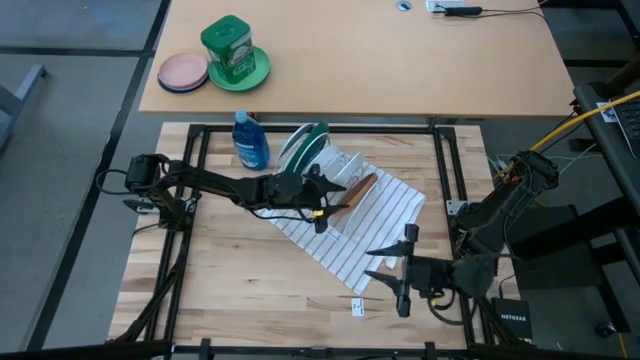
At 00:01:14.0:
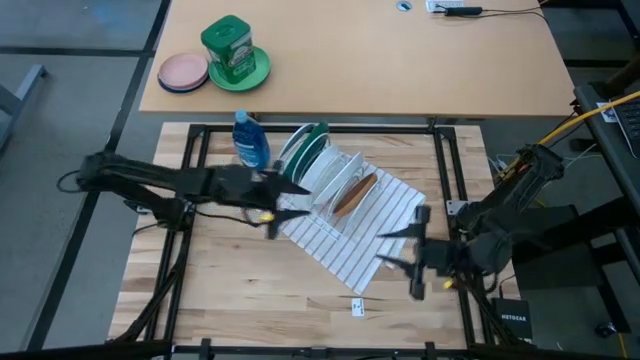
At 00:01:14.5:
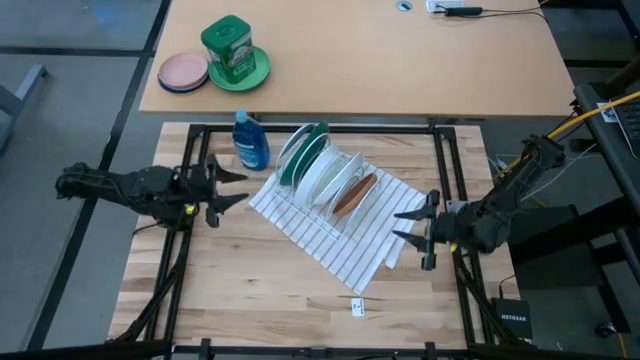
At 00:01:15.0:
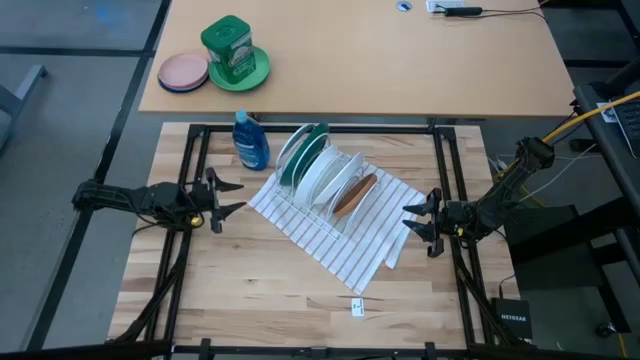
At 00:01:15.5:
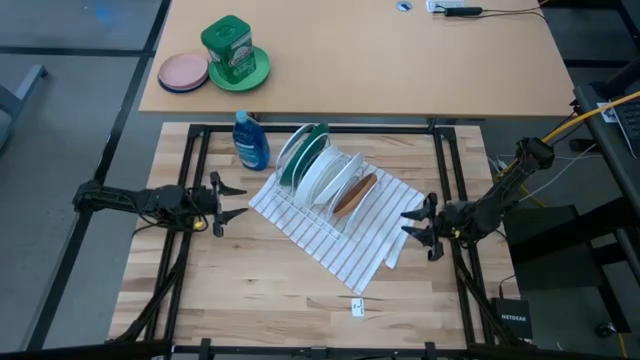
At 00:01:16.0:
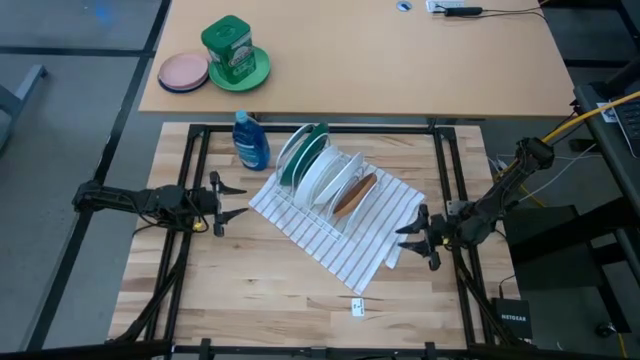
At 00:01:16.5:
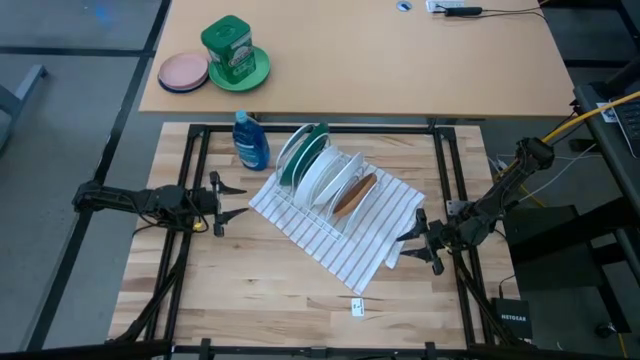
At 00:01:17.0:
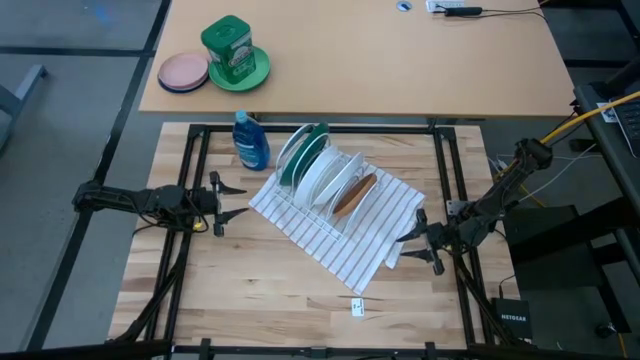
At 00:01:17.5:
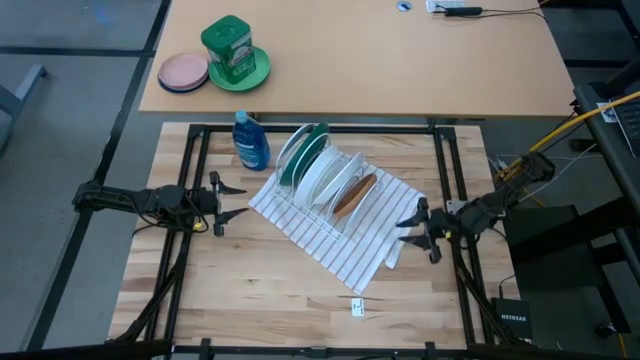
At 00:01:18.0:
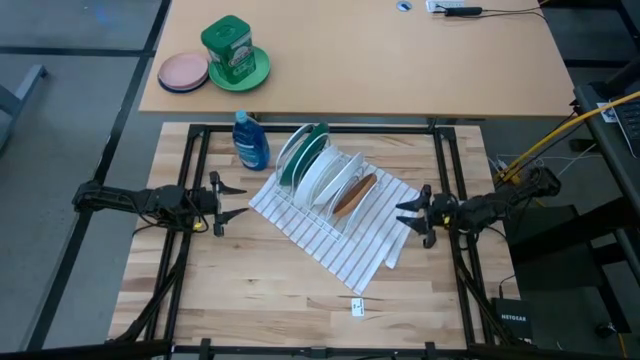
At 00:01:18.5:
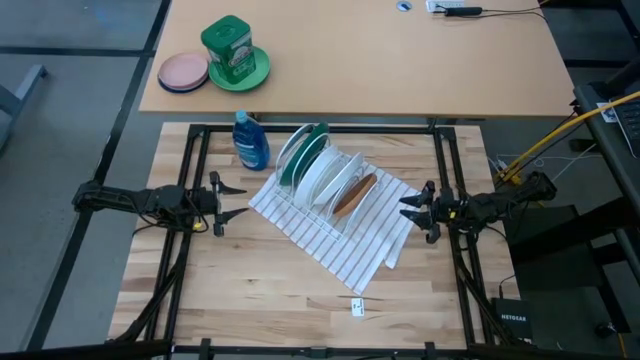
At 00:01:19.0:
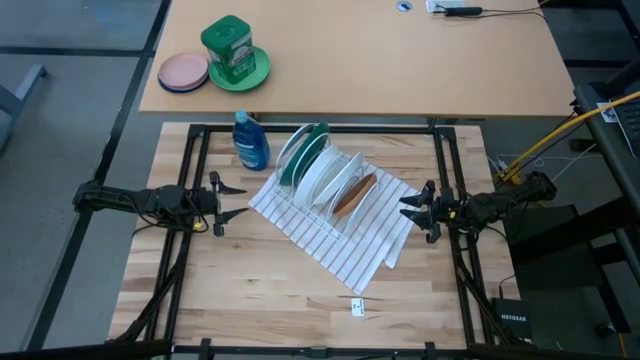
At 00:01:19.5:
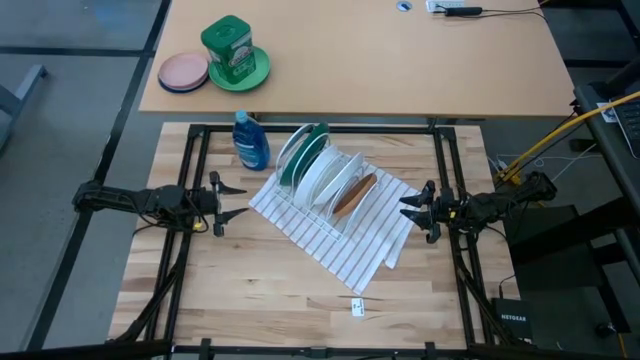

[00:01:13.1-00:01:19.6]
Task: Sort dishes
Return to Home Position

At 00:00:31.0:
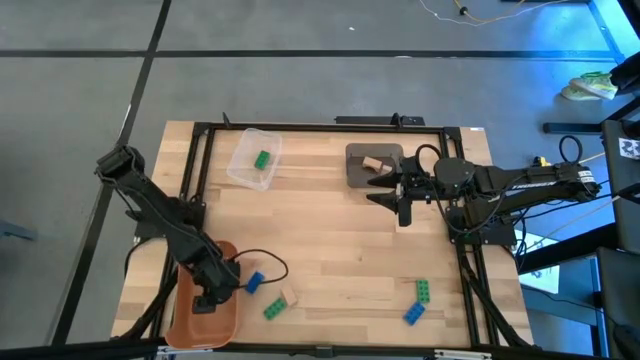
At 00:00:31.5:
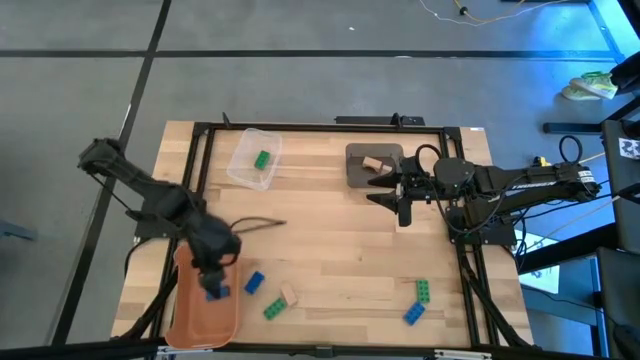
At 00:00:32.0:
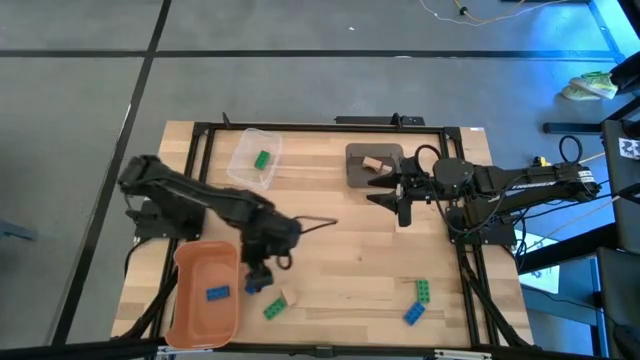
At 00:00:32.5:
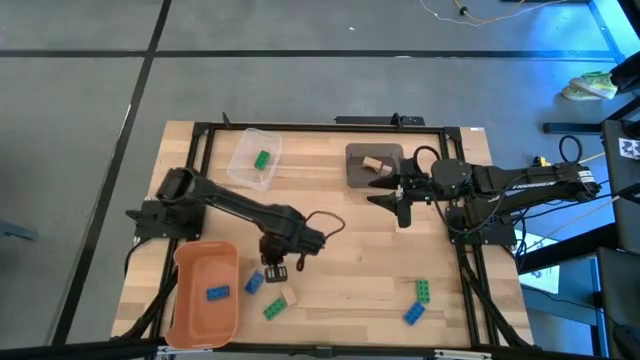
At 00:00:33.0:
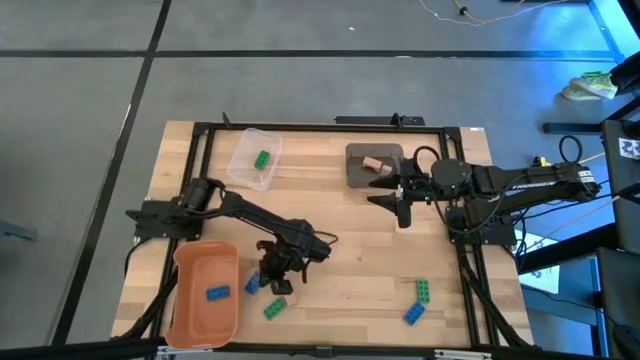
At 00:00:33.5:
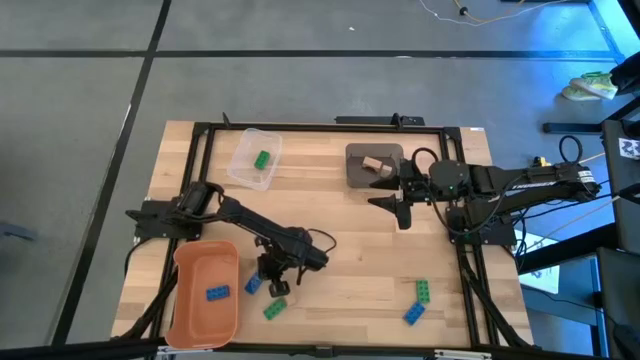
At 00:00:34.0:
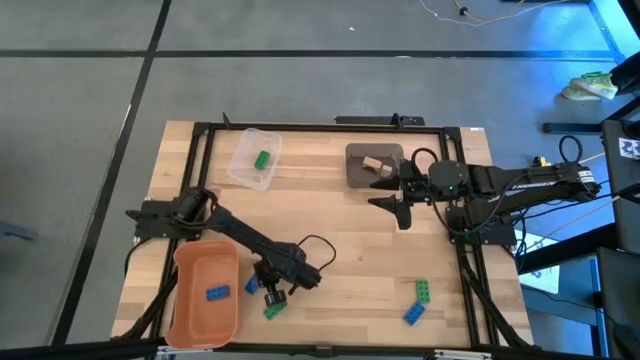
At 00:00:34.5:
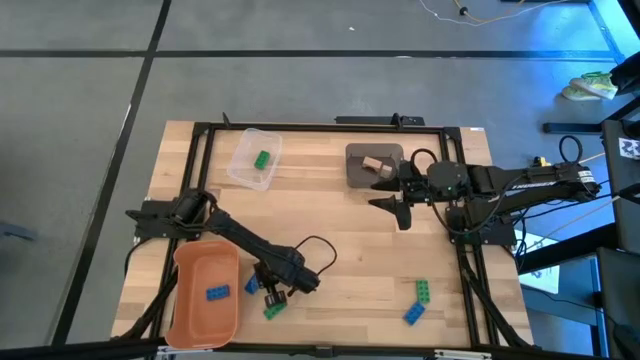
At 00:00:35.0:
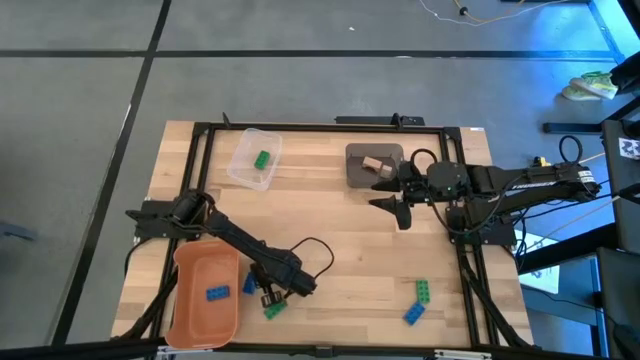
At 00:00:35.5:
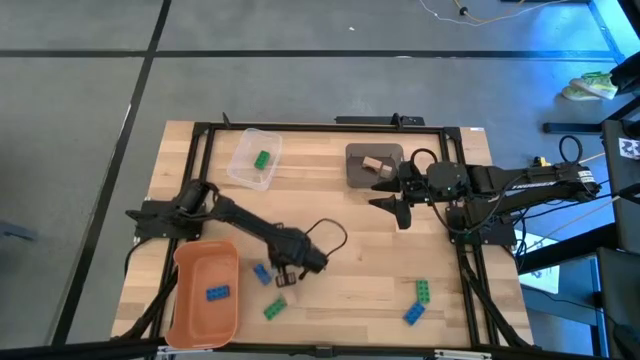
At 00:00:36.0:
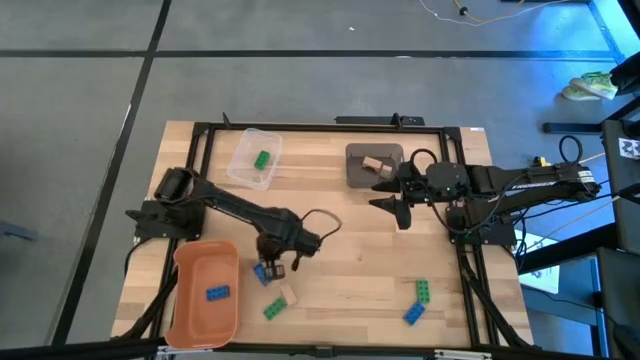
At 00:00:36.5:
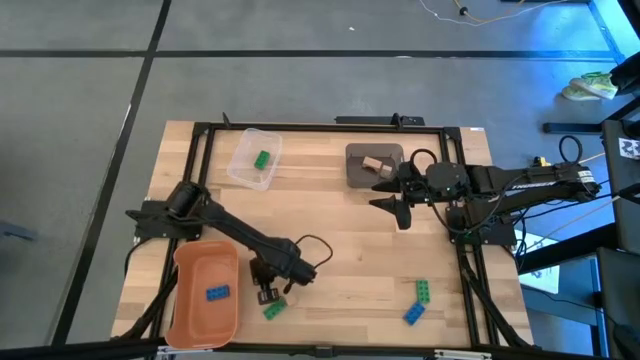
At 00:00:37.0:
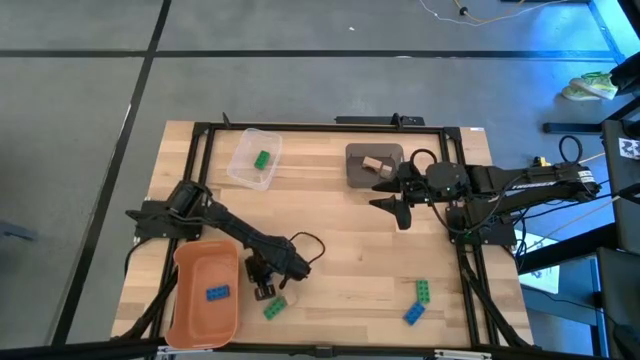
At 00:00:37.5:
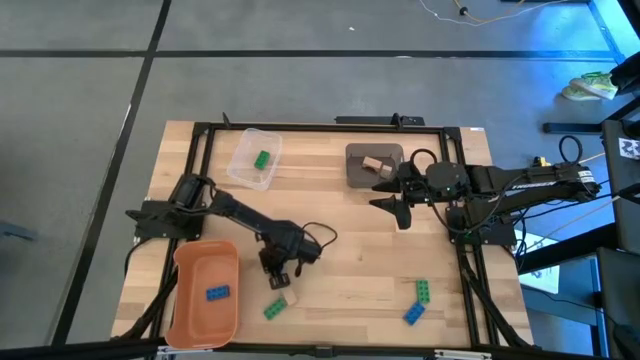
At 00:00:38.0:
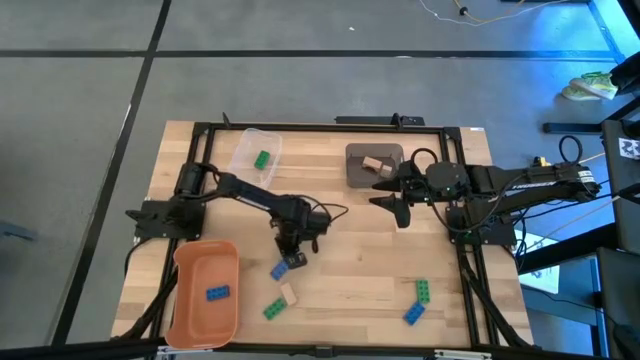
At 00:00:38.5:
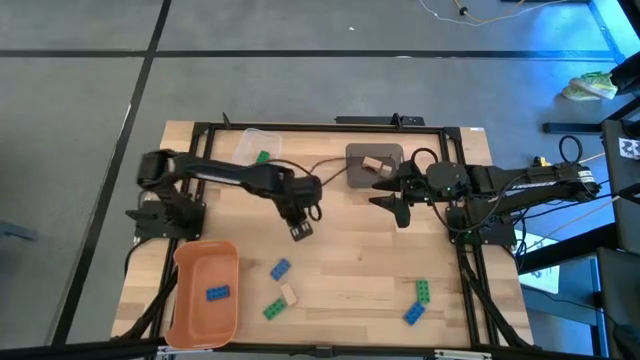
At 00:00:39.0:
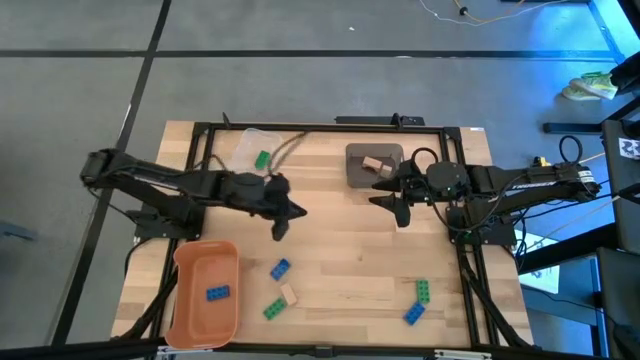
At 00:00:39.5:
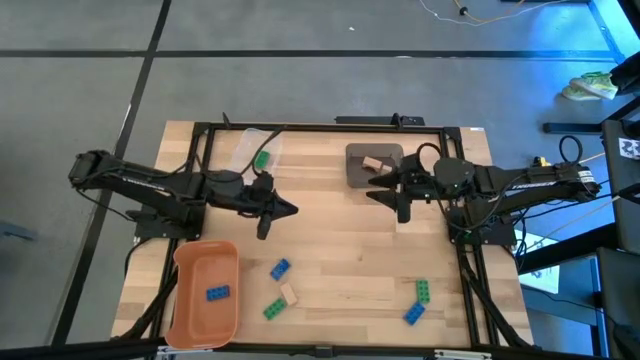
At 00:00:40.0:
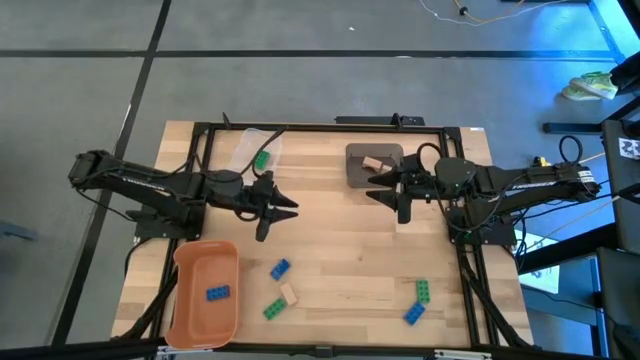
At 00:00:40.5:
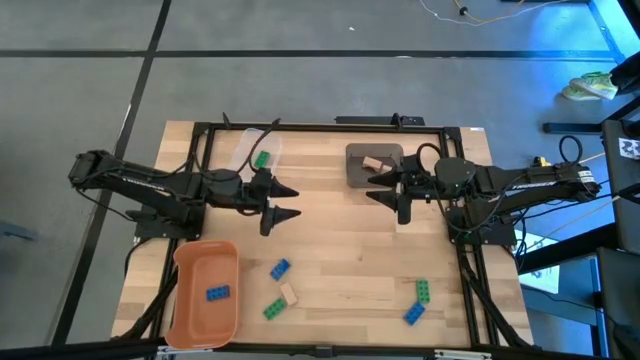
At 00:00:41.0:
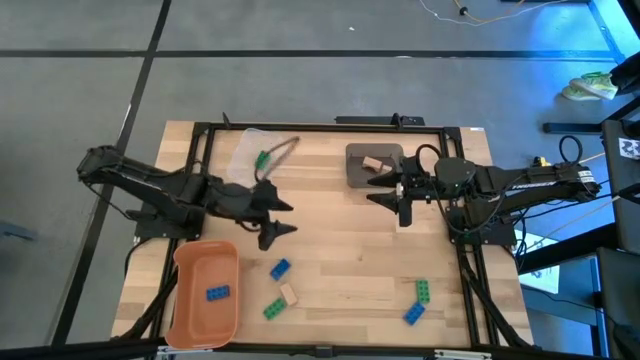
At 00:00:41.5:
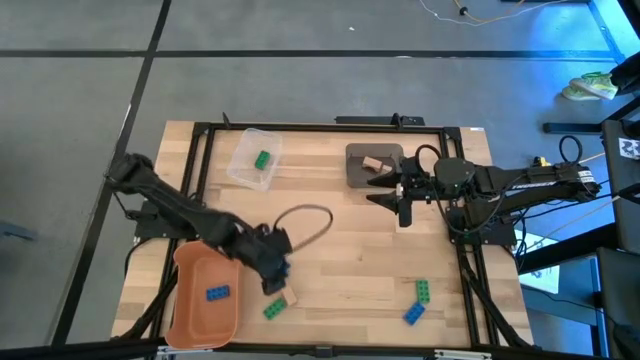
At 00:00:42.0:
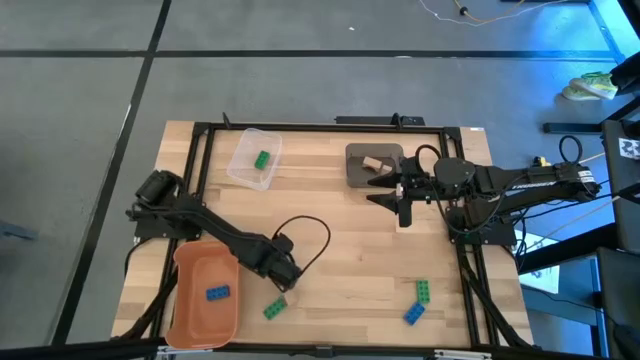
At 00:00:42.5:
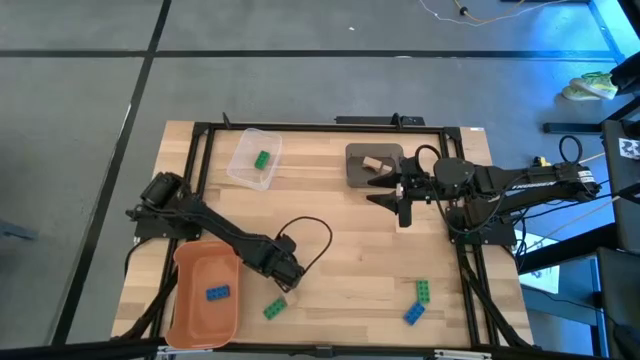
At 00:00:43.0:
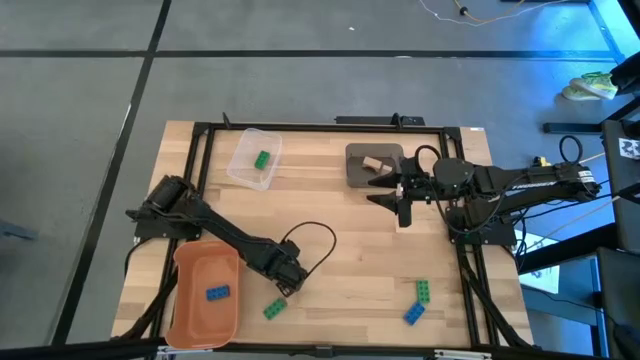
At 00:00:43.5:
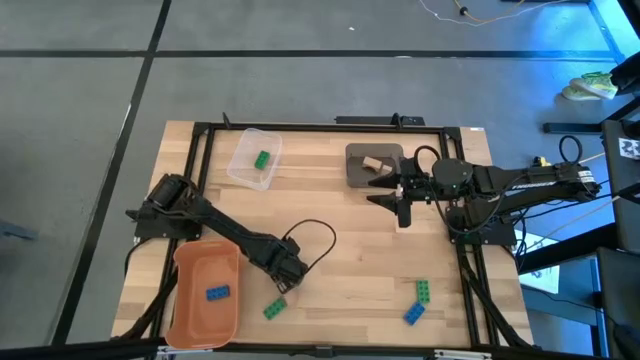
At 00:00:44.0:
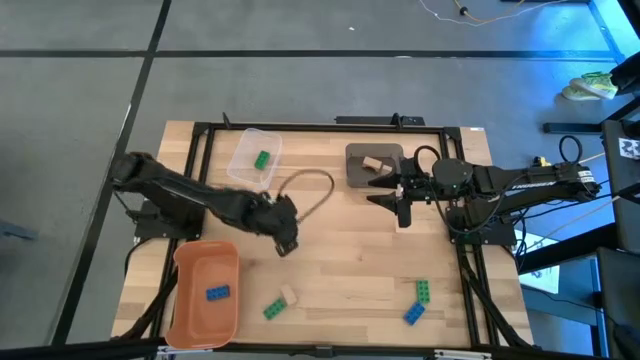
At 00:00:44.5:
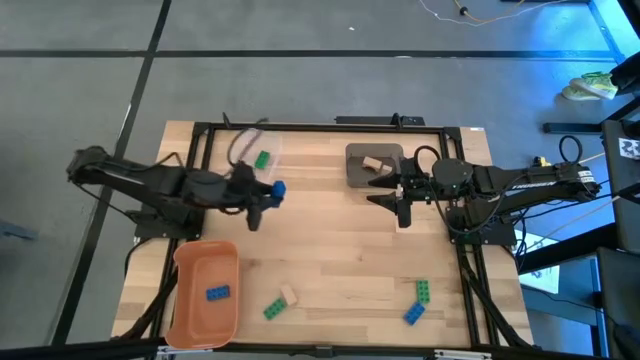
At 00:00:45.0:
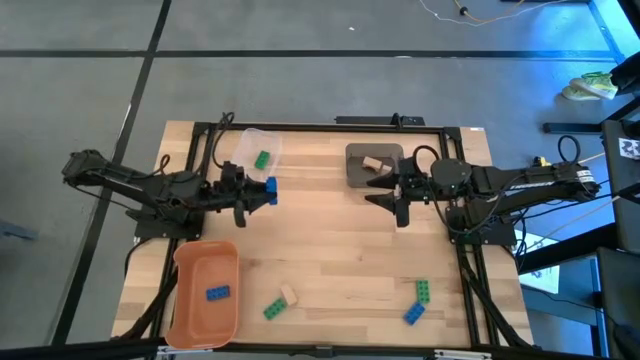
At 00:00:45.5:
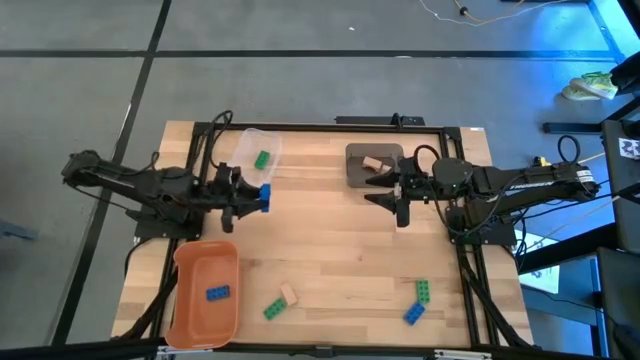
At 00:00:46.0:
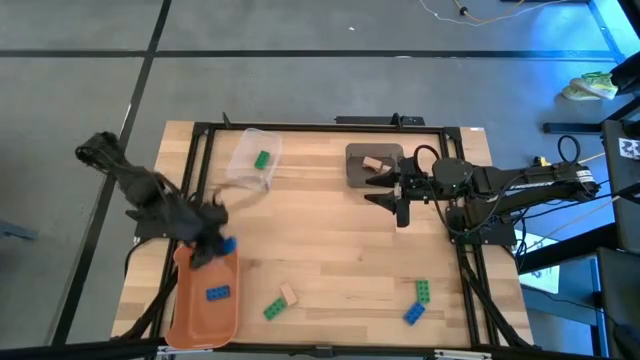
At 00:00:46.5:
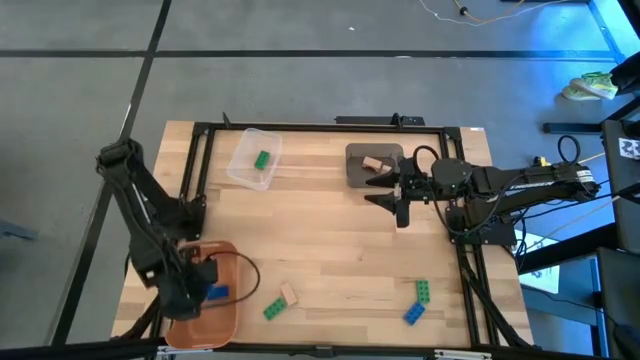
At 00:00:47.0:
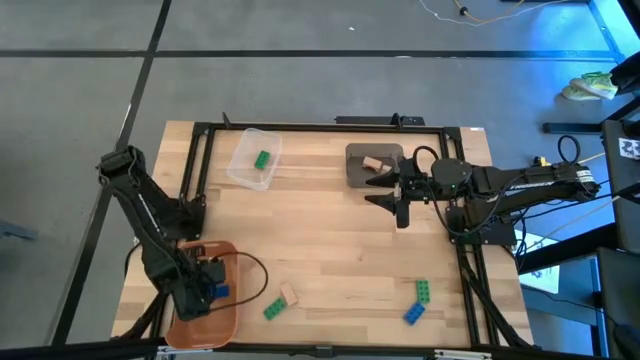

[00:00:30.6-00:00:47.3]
Task: Sort & place blocks by color
Put the left blue game piece into the orange bin
